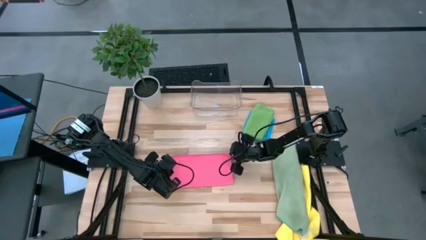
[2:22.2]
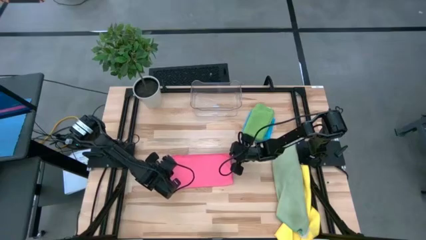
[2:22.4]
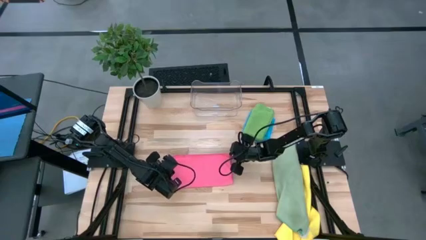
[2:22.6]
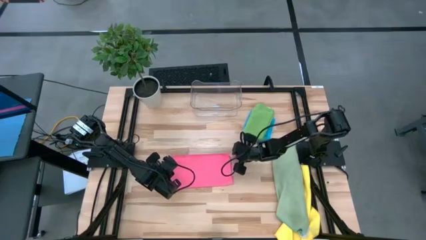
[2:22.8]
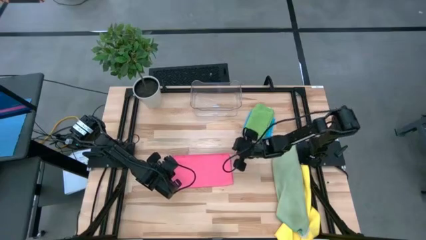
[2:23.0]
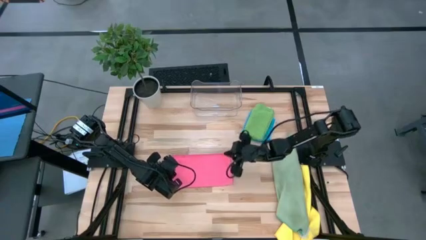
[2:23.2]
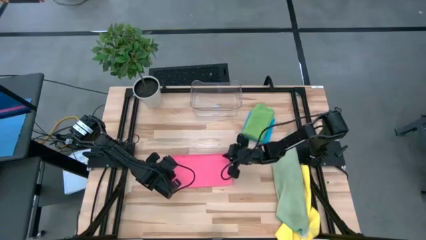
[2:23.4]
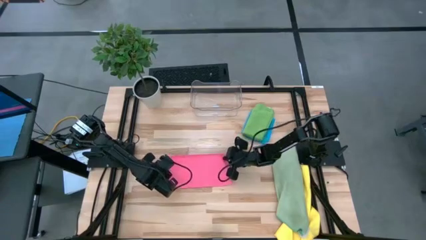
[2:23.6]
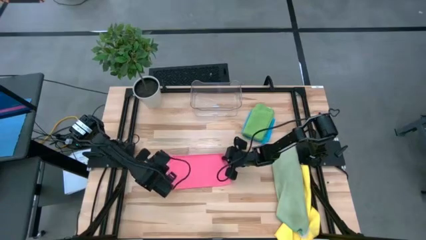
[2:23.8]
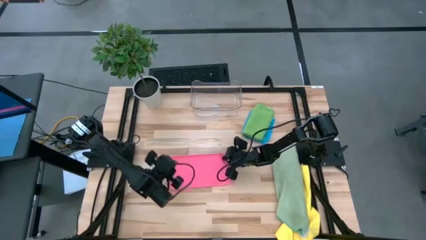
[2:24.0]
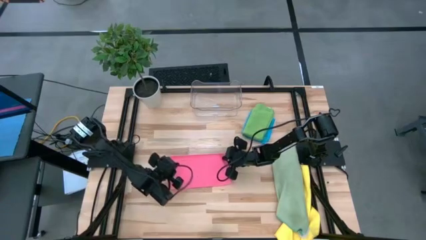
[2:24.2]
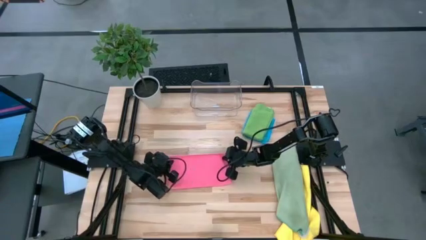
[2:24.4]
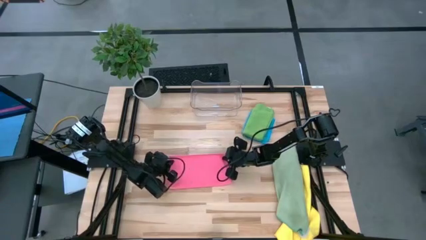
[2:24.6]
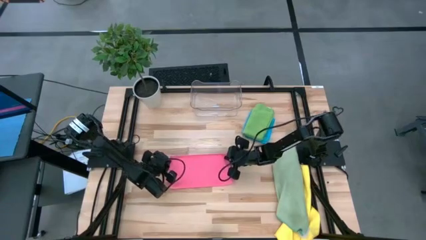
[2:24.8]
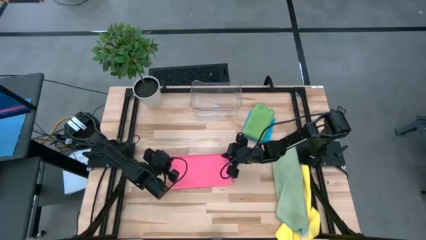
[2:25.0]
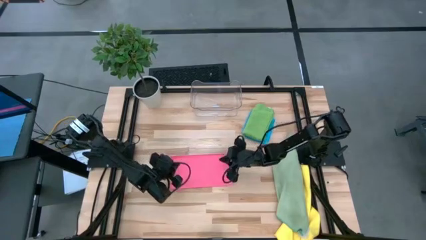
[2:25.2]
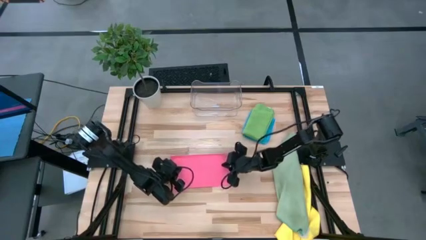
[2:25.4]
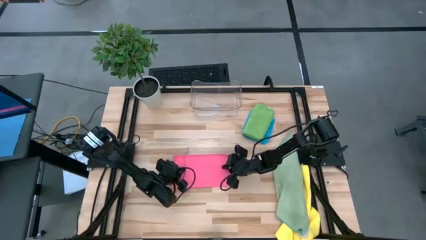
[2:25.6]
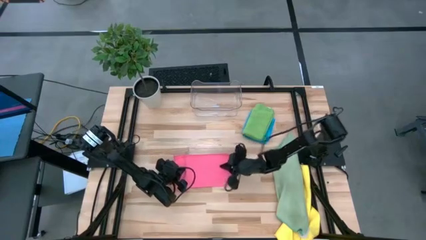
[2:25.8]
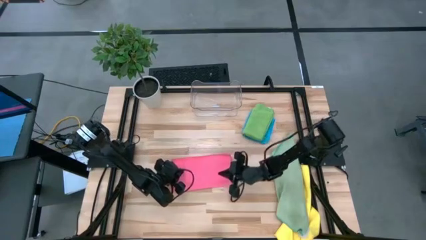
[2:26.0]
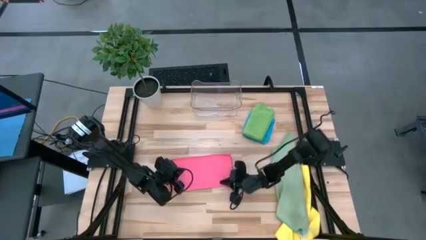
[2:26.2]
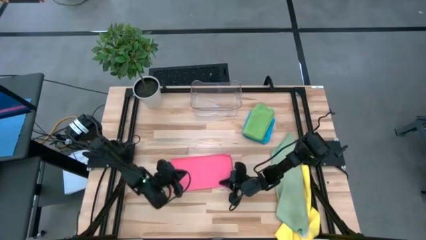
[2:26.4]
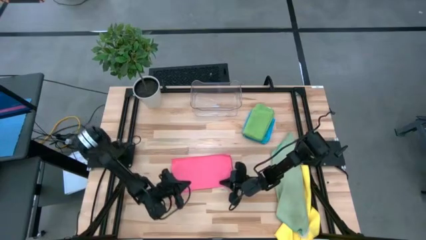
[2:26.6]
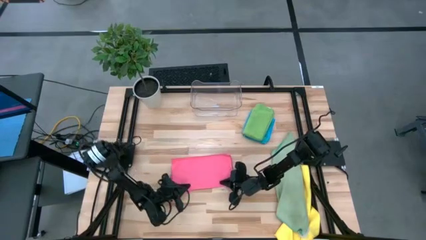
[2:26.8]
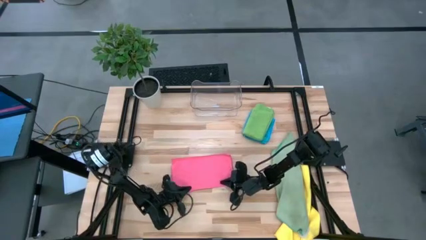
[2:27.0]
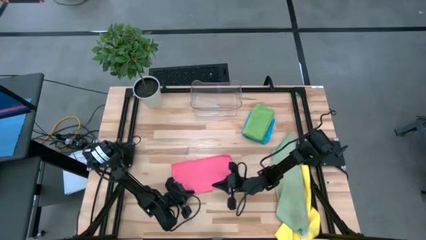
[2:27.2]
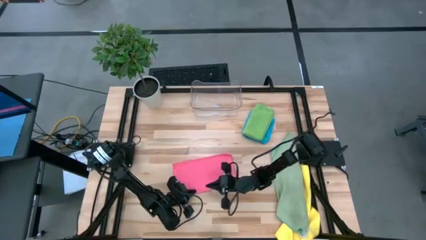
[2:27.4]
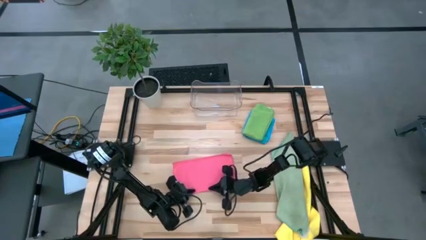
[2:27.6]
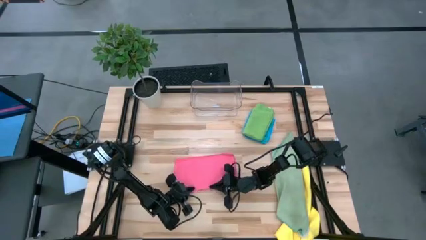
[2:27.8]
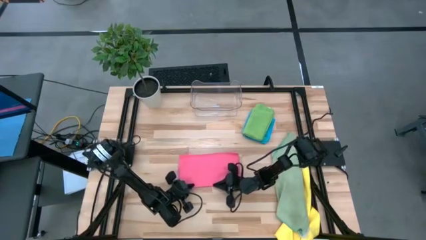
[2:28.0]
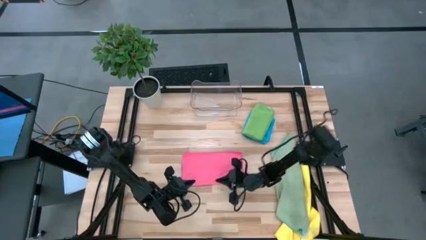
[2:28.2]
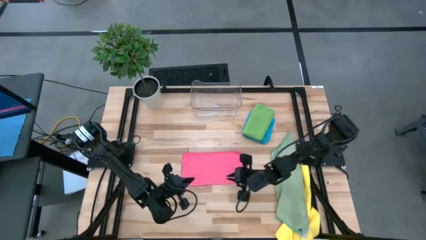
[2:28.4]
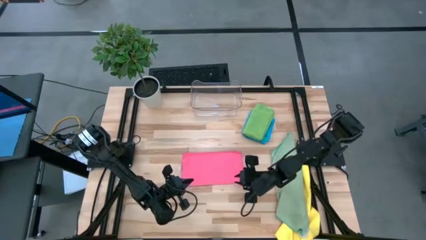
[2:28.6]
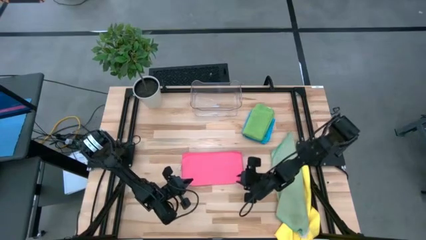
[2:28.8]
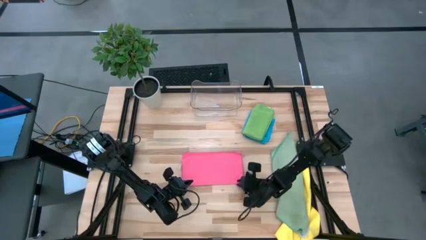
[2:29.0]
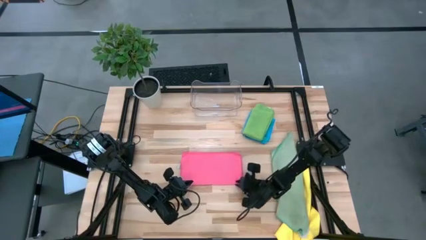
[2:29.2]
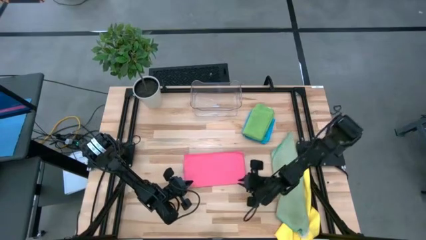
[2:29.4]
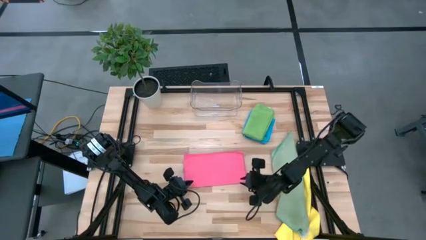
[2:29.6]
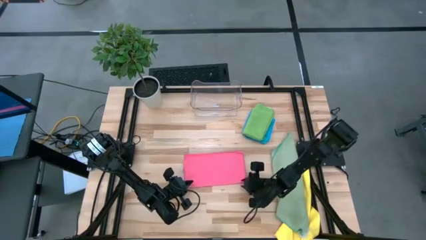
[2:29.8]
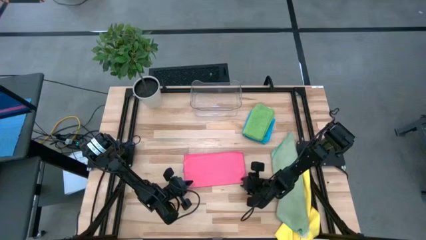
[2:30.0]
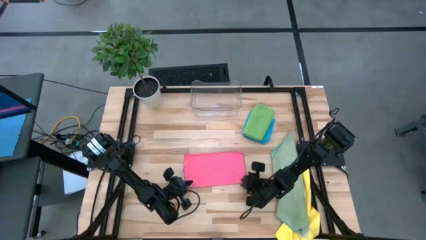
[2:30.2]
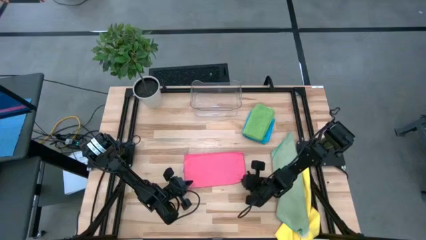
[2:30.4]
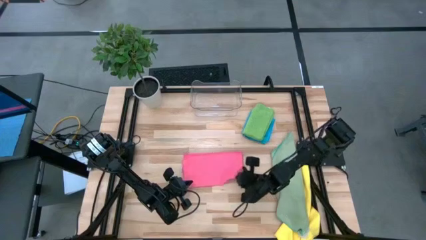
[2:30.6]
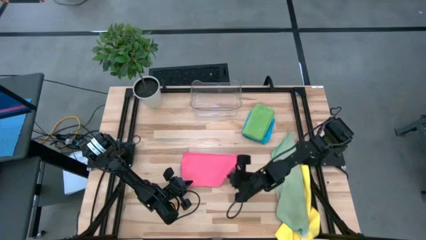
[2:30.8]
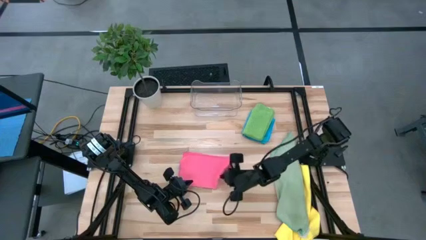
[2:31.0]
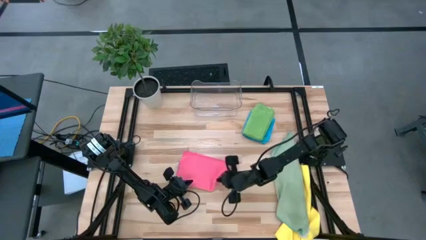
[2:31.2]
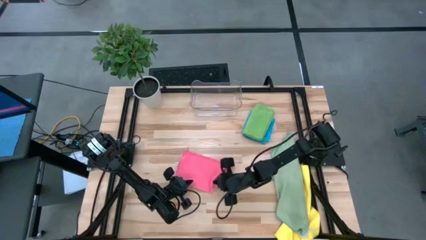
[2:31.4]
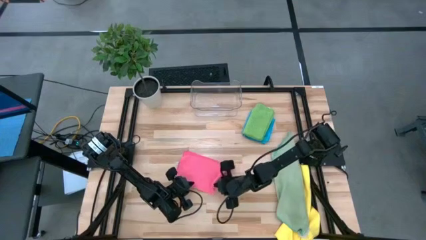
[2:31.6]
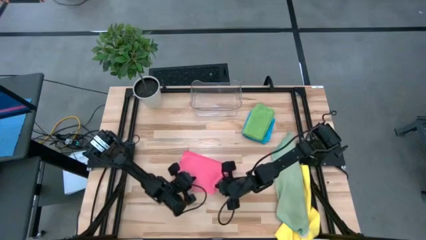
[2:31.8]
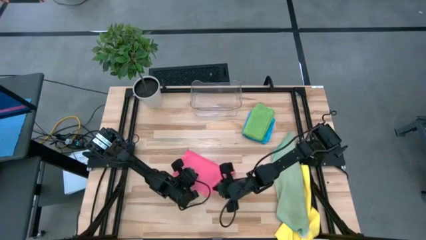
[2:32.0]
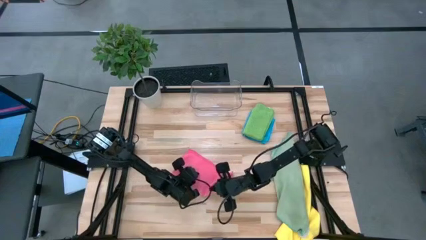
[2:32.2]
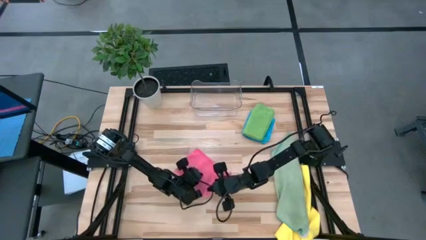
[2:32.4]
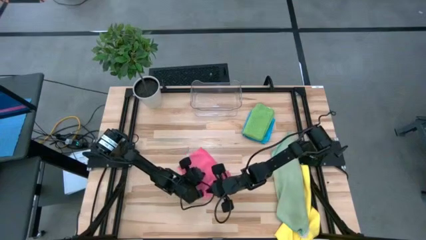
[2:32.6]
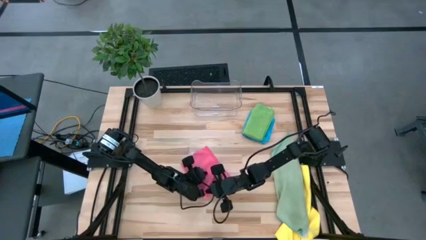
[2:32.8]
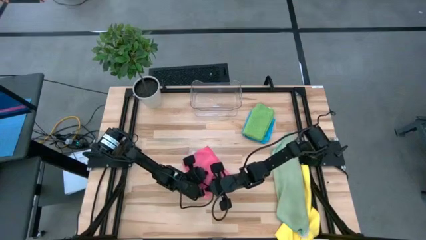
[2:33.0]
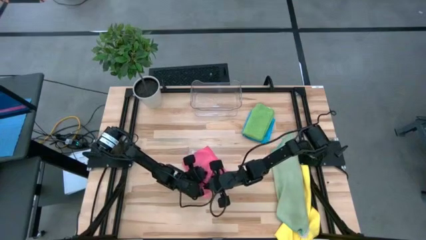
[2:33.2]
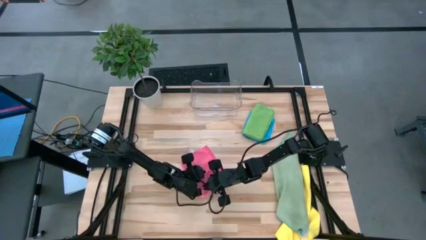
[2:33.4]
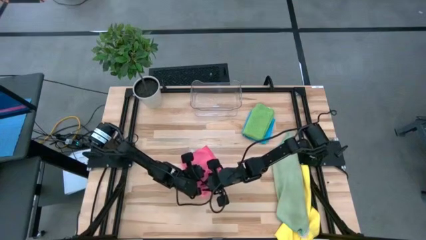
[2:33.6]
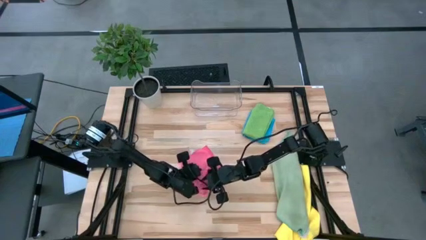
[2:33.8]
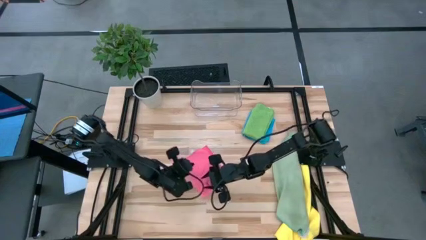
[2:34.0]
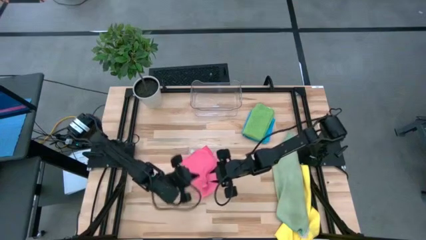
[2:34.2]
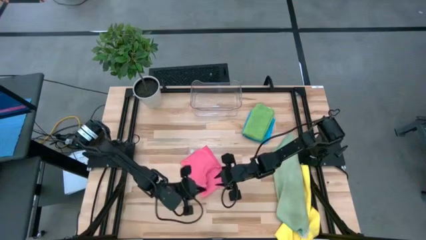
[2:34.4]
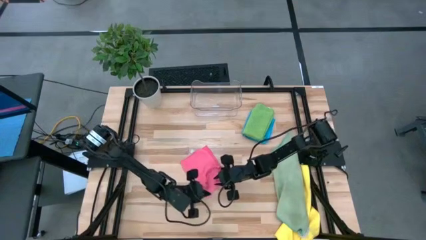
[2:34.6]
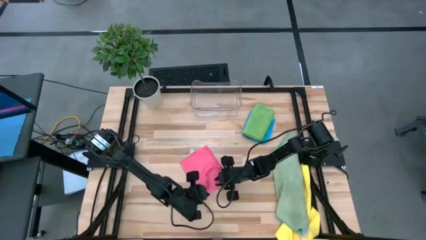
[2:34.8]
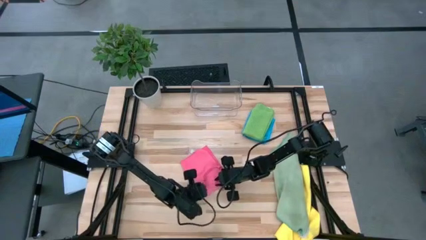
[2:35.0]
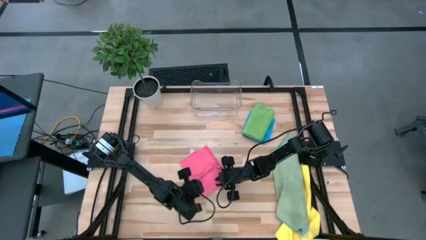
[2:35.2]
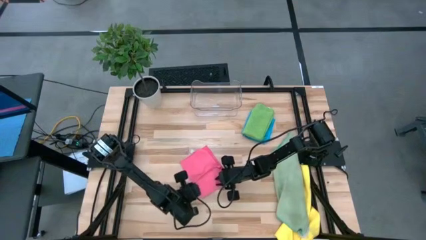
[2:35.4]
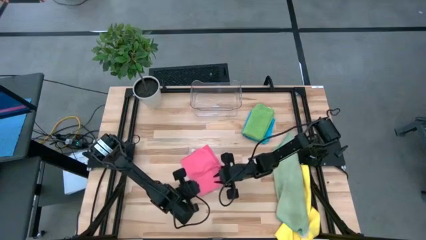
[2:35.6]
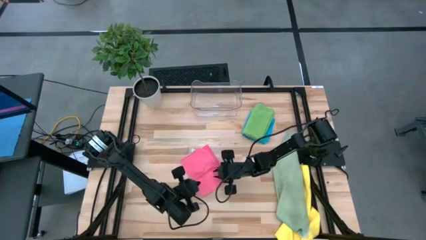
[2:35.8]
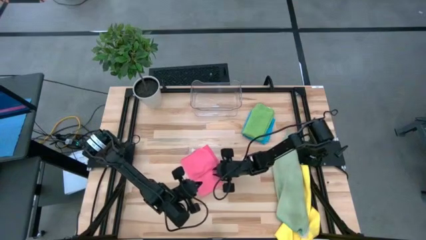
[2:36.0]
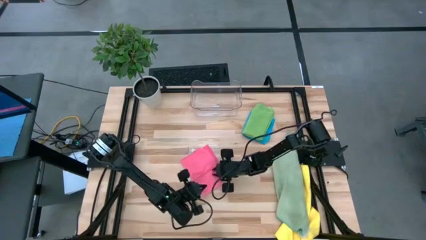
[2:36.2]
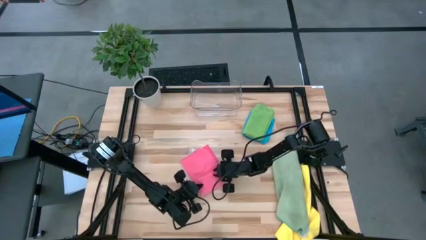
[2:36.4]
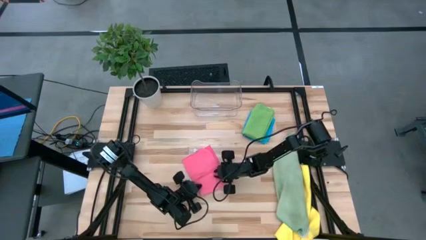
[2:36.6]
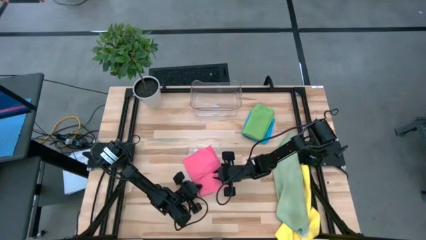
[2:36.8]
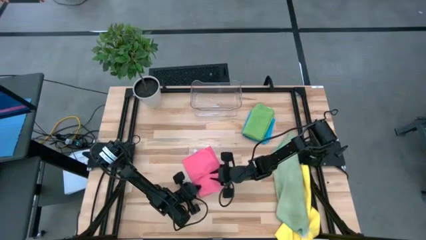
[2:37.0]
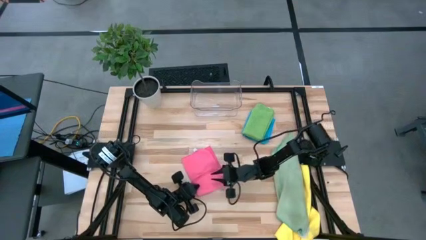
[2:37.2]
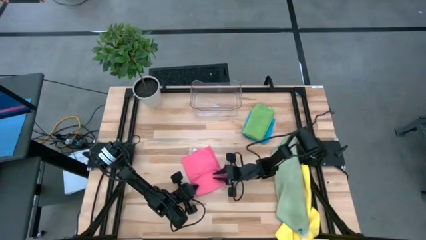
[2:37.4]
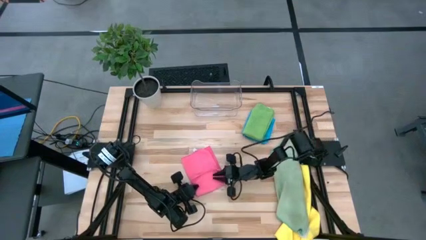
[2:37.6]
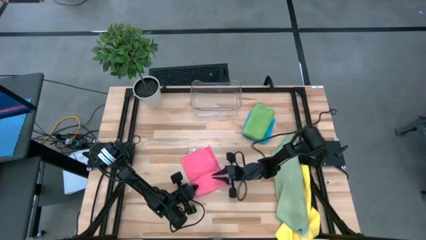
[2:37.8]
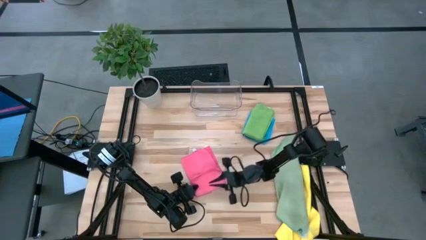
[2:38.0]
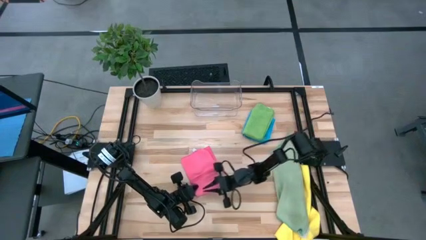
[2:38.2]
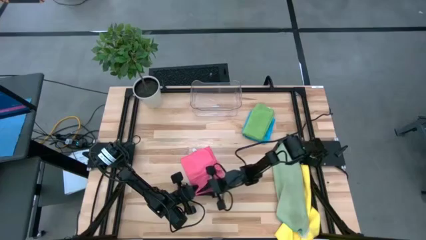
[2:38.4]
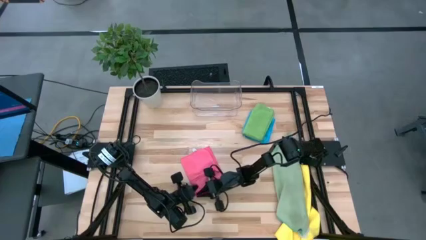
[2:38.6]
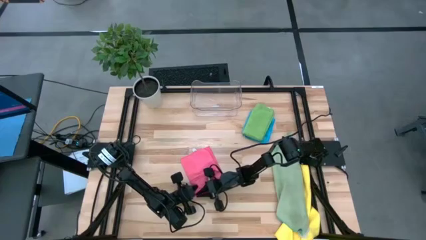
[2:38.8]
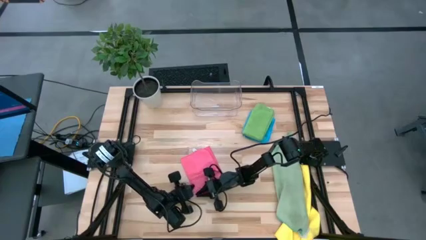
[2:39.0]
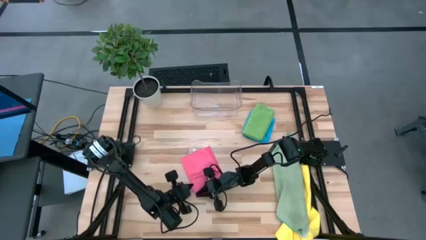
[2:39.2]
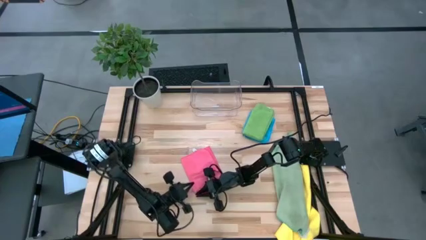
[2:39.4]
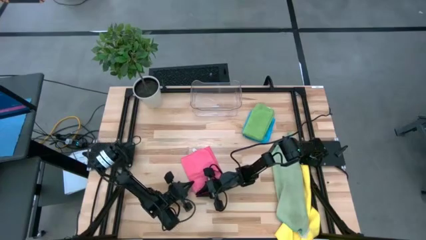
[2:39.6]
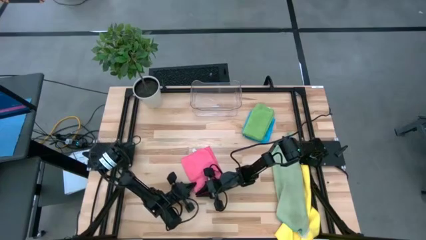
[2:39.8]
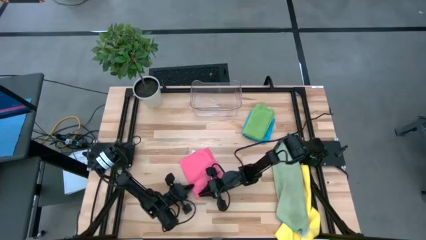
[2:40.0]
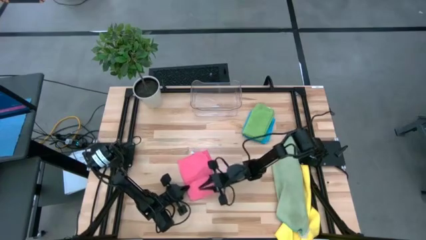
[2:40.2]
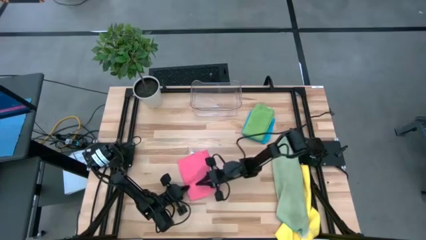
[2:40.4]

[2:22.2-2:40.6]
Task: Fold microfiber towels
Fold pink microfiber towel
